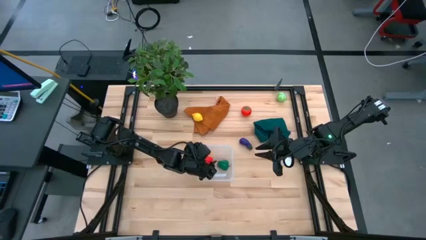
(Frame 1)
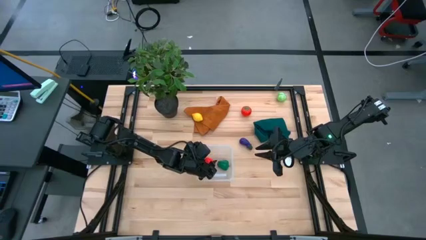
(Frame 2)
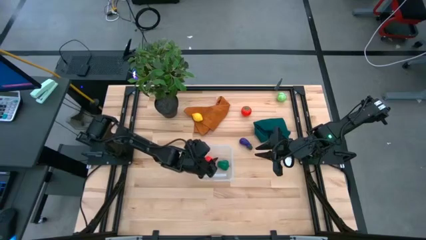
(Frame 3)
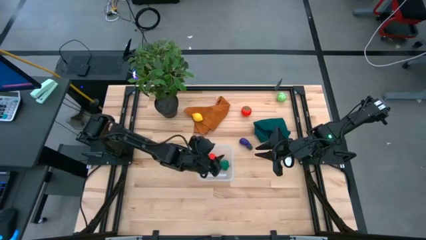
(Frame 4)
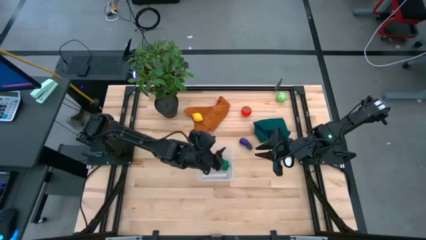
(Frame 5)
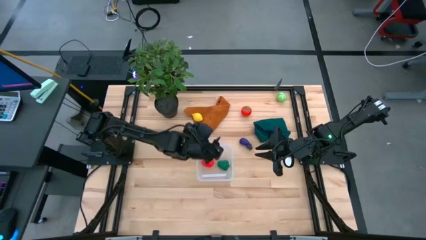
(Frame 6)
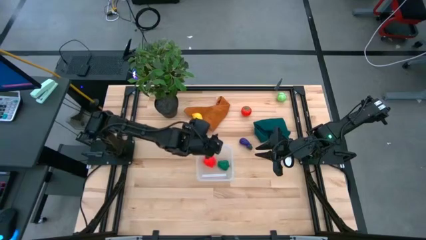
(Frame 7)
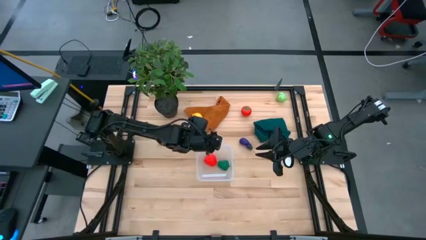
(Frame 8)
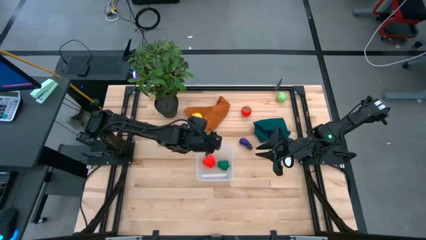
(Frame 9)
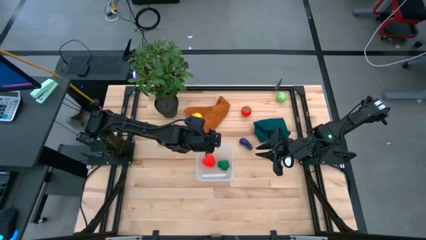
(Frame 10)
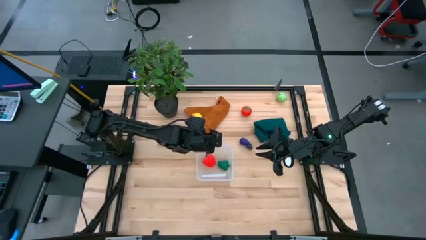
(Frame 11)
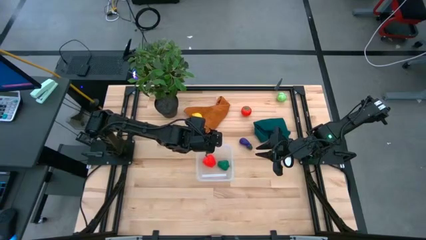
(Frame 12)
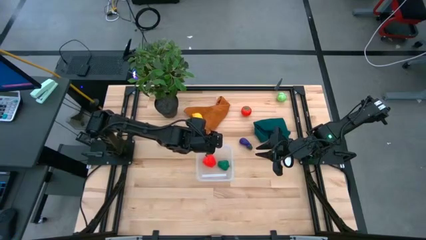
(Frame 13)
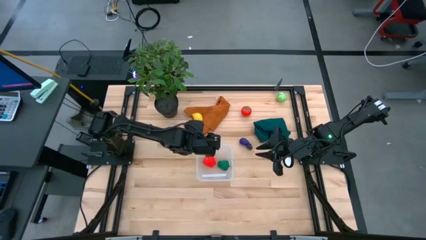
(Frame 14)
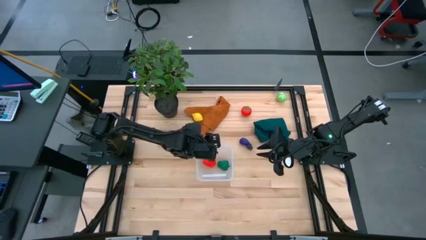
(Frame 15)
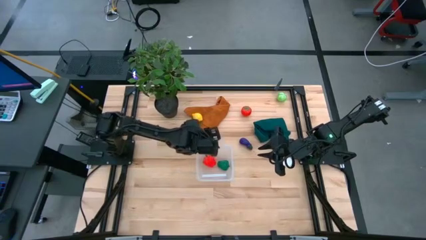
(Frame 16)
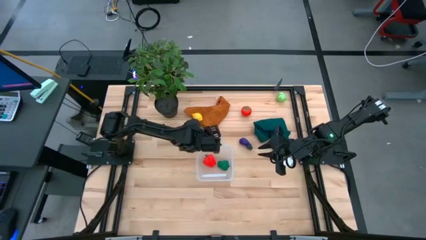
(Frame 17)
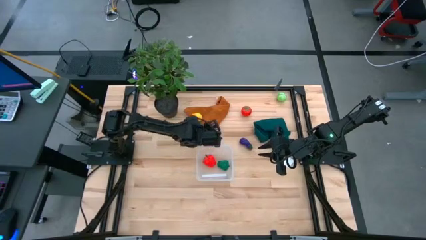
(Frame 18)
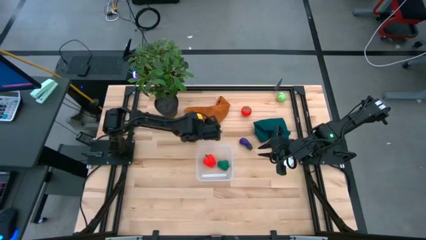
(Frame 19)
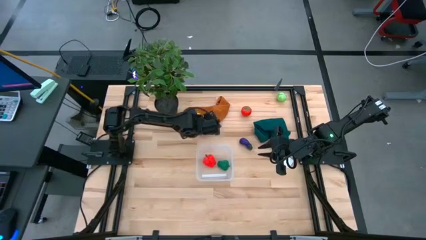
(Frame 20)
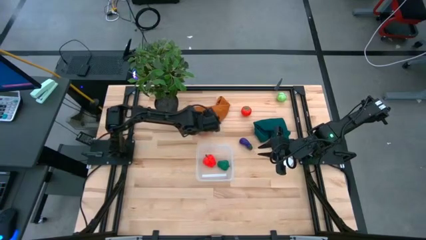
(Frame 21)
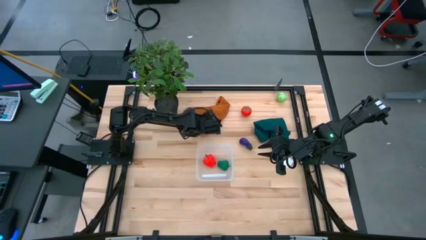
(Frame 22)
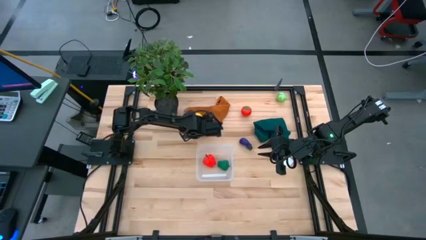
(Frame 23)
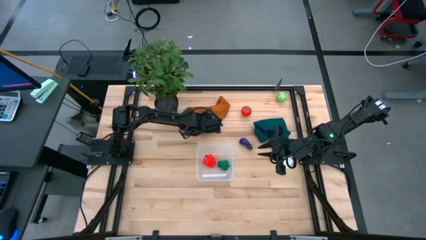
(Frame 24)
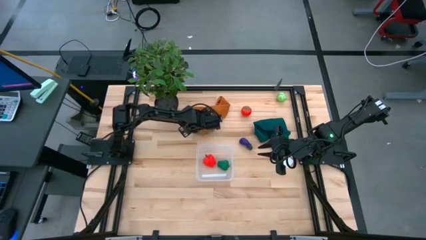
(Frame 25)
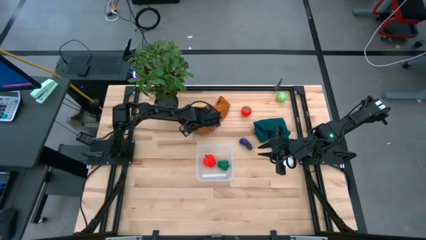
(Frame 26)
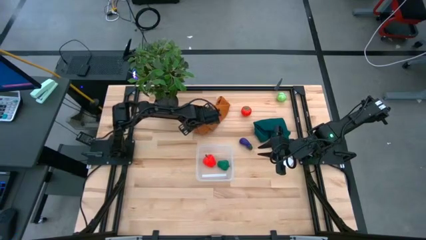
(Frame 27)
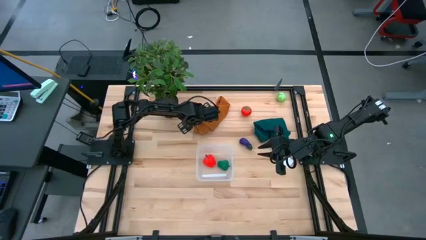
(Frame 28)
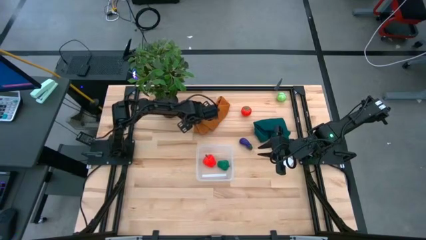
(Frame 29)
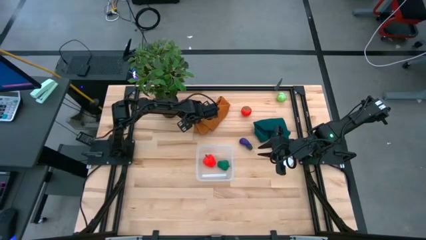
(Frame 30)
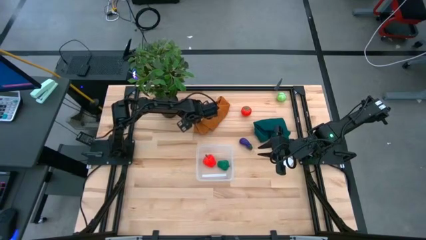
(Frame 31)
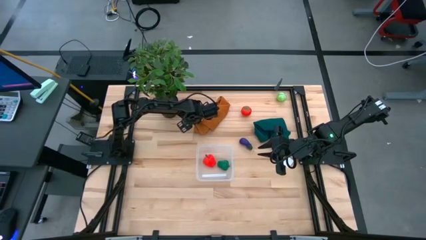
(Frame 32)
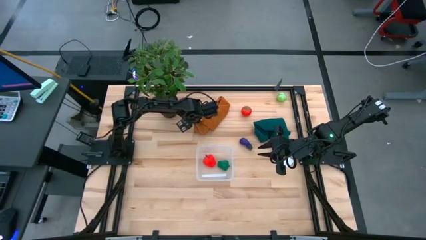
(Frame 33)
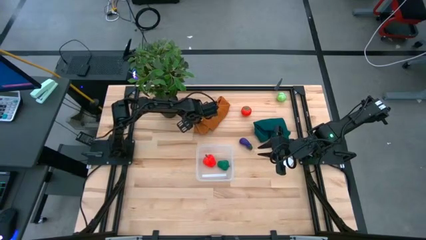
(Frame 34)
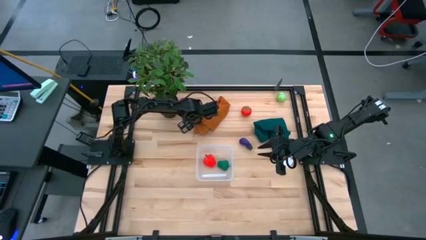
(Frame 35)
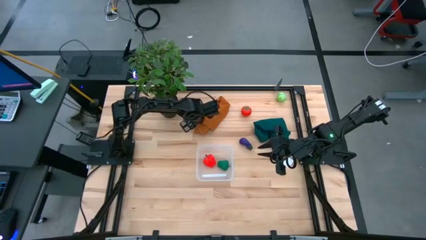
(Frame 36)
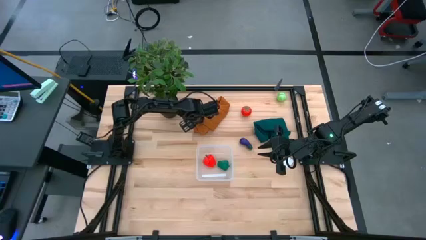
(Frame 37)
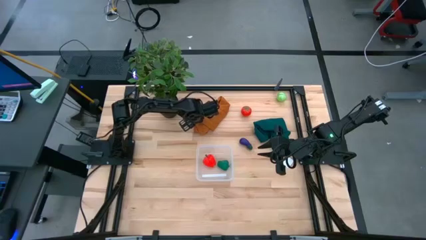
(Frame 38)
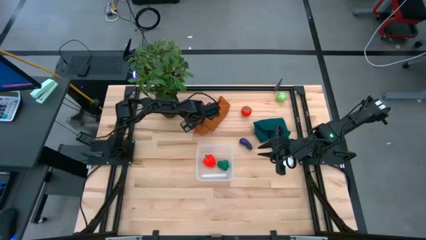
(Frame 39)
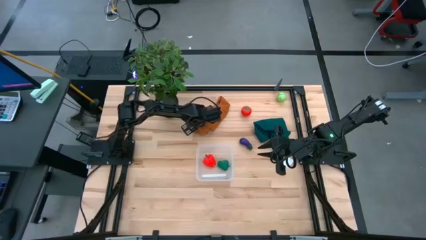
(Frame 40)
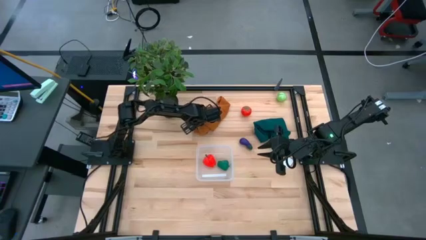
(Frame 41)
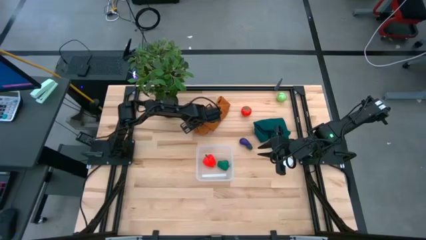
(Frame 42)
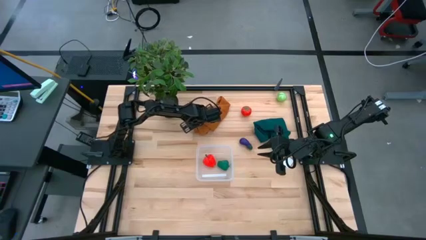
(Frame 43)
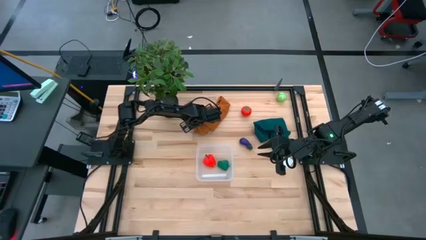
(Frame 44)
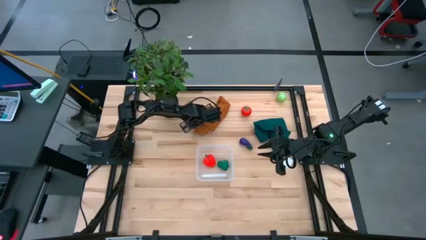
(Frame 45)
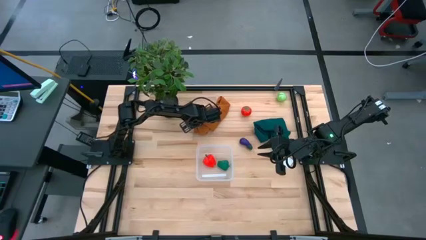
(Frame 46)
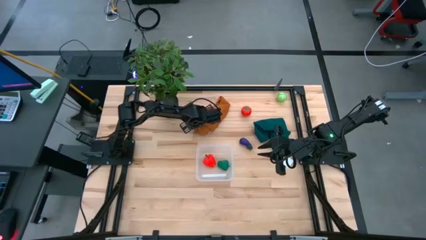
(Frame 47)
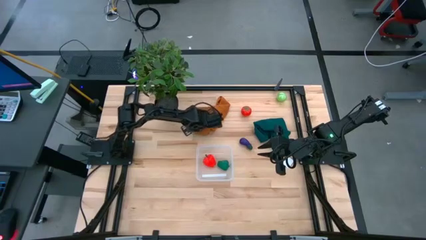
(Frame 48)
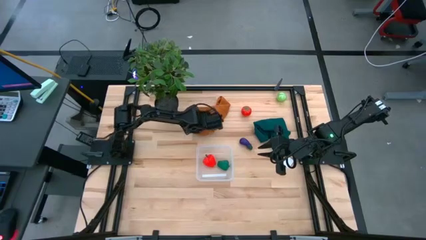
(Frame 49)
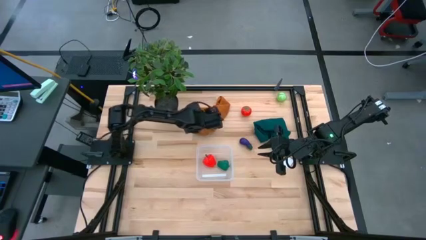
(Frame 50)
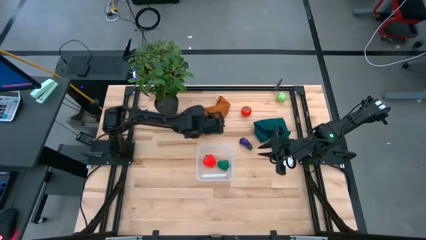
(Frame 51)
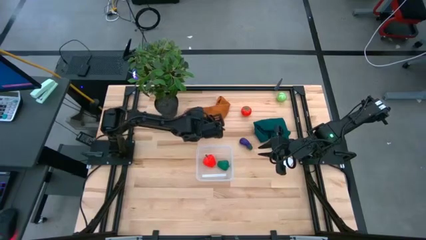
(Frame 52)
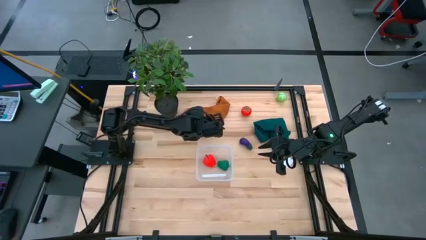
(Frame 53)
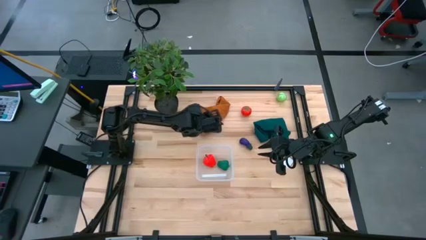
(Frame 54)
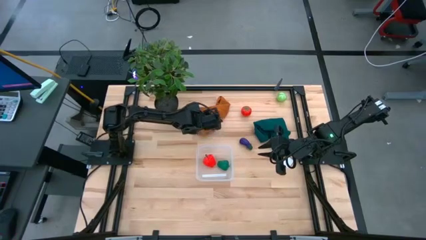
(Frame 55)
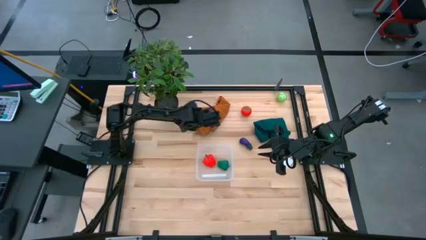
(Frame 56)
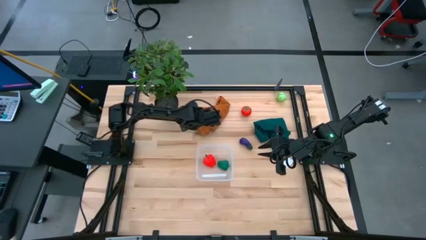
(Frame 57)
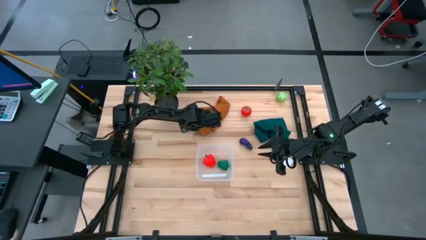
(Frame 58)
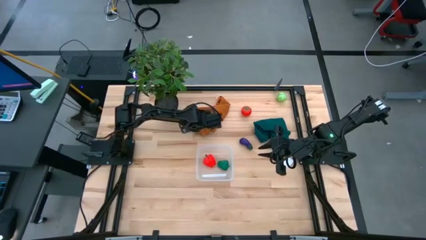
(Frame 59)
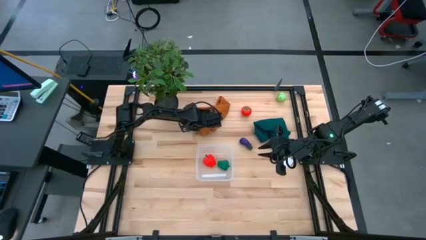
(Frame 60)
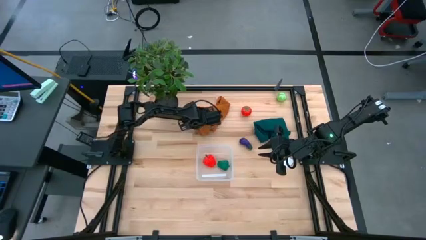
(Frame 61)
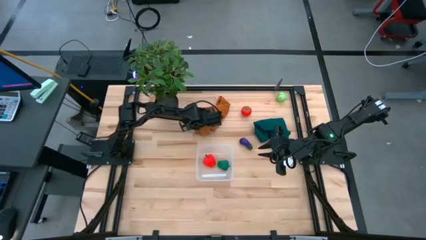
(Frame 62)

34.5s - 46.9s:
Task: Pick and placing Produce into tupperware
Put the lemon into the transparent bin

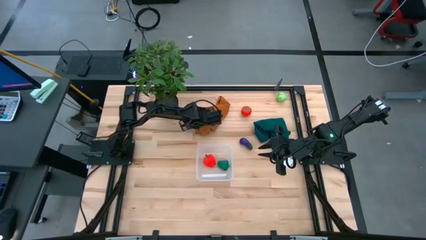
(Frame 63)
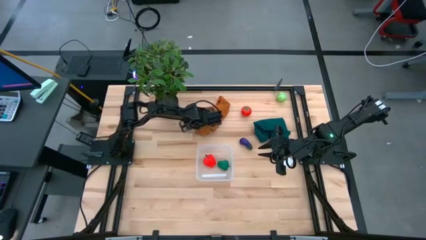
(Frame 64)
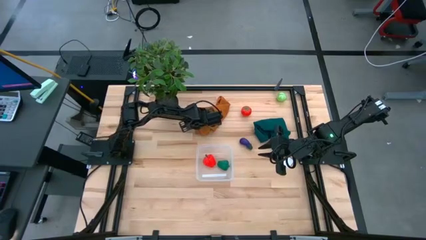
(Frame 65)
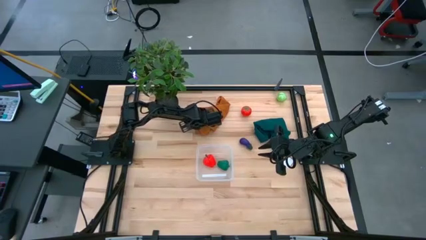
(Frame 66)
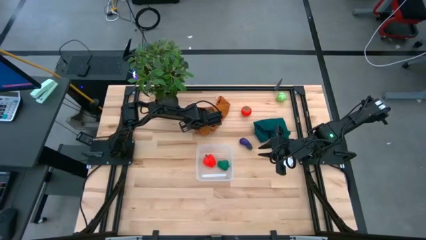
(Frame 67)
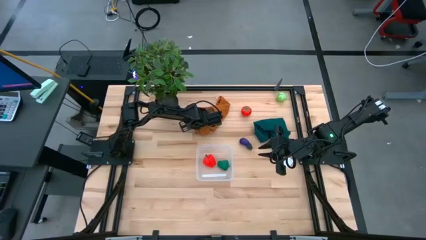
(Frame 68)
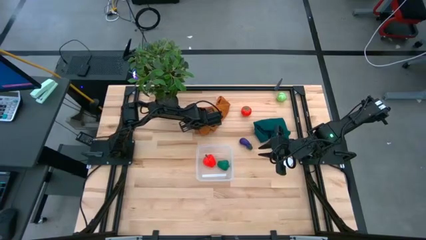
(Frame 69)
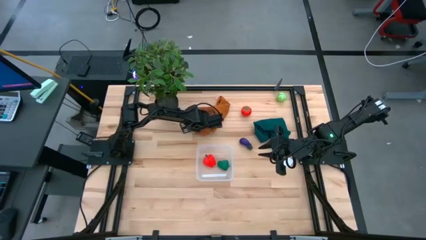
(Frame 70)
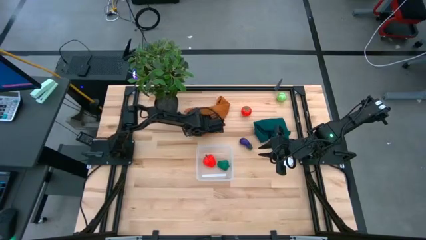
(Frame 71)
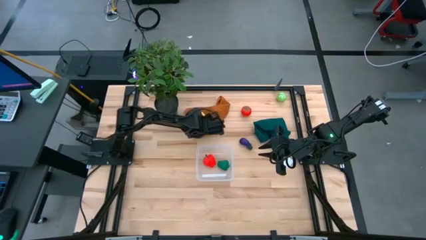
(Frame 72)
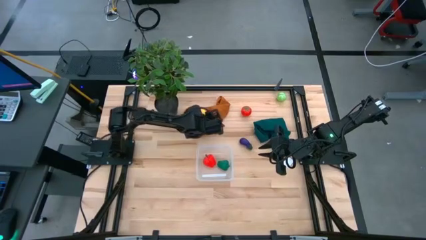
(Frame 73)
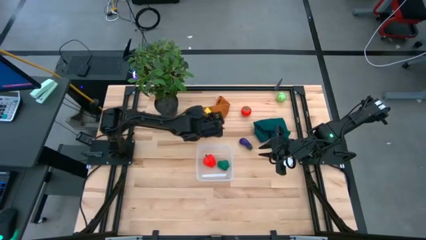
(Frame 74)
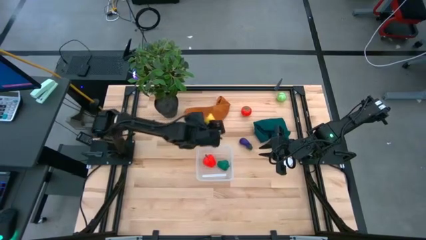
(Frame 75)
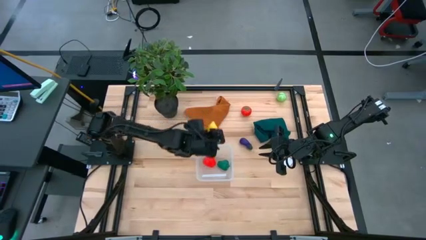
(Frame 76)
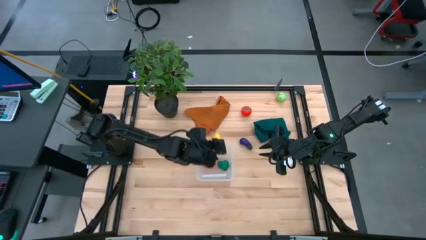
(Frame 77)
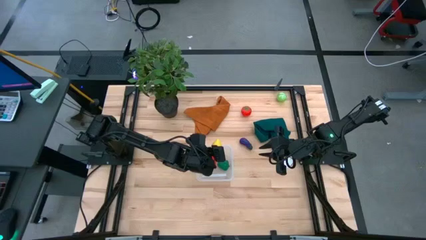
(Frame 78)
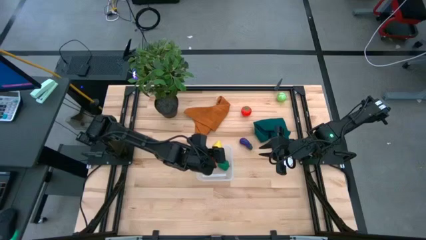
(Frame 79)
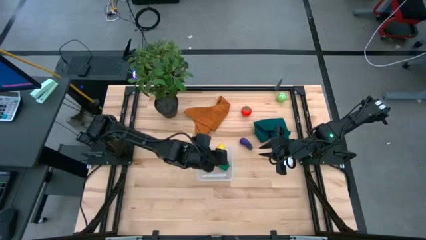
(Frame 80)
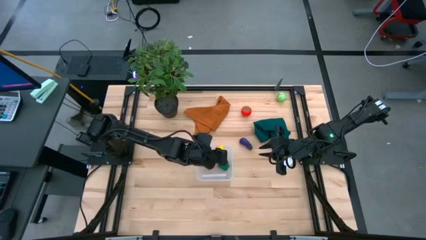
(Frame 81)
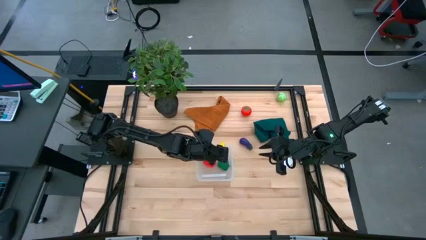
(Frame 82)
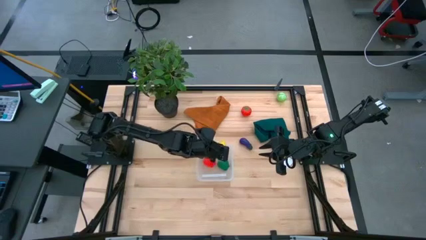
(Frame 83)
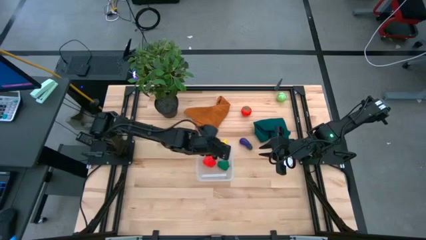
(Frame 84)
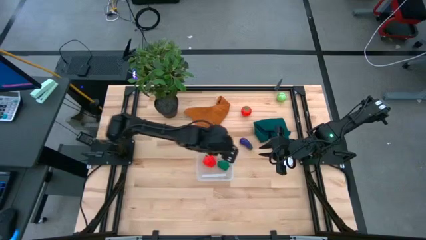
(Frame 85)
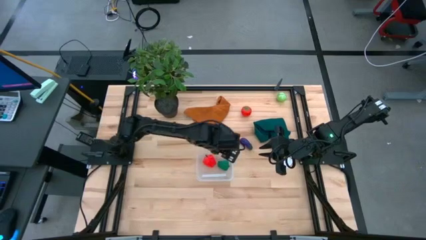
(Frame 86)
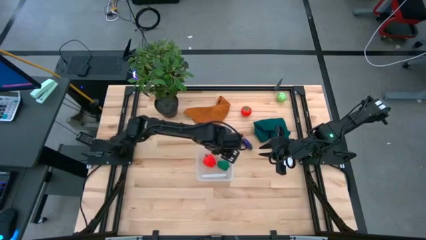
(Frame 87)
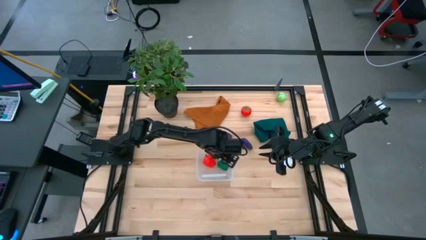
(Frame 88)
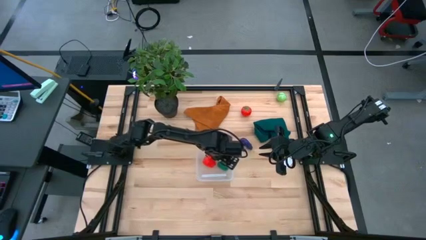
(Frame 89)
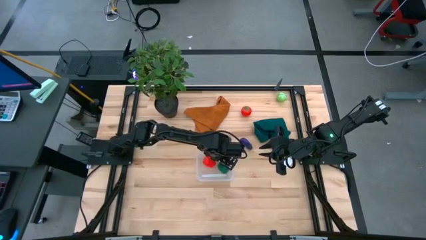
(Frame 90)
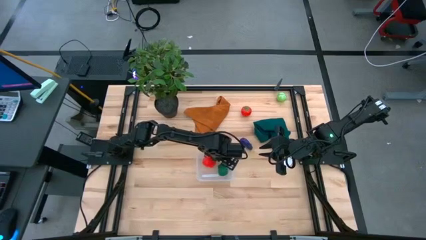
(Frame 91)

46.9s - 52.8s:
Put the lemon into the transparent bin
